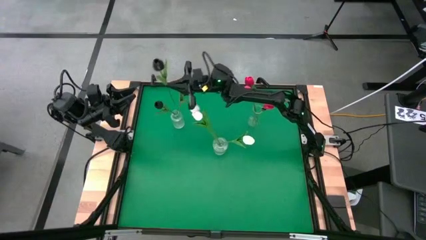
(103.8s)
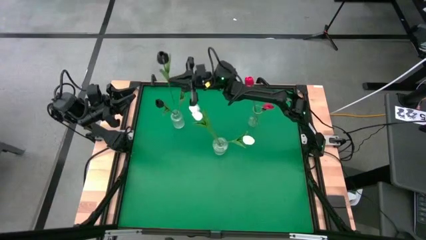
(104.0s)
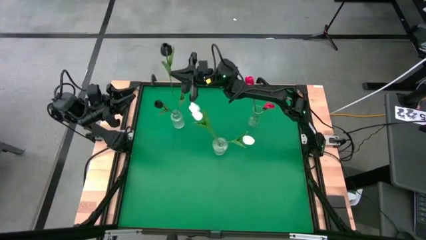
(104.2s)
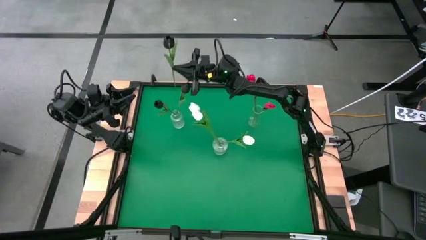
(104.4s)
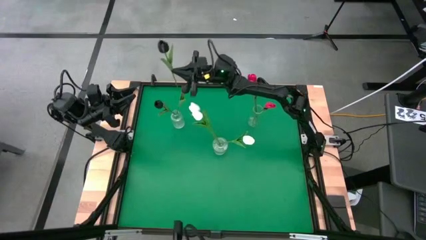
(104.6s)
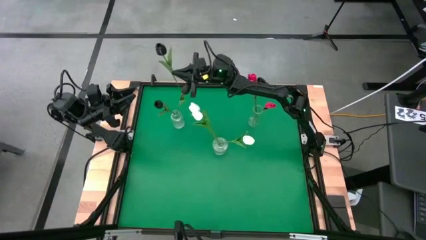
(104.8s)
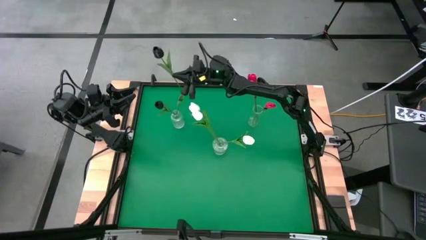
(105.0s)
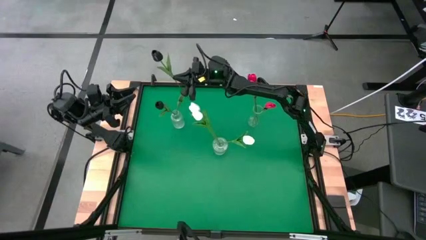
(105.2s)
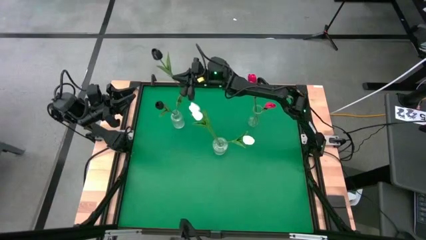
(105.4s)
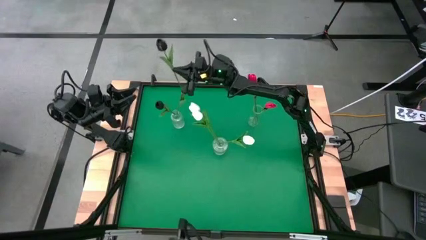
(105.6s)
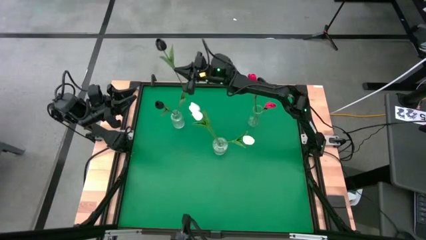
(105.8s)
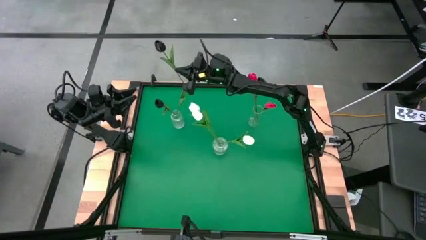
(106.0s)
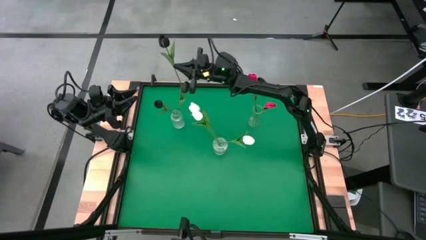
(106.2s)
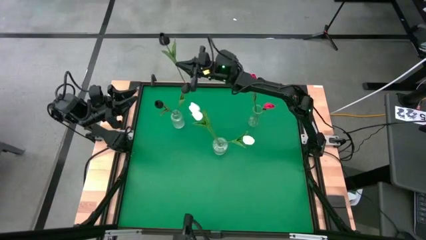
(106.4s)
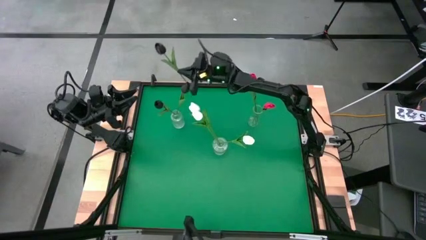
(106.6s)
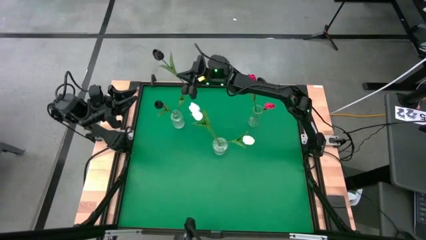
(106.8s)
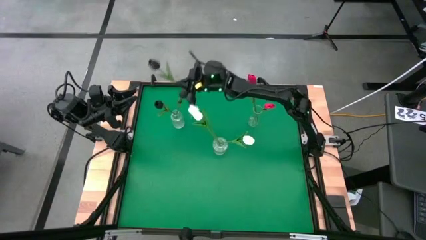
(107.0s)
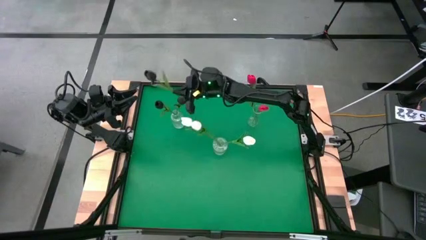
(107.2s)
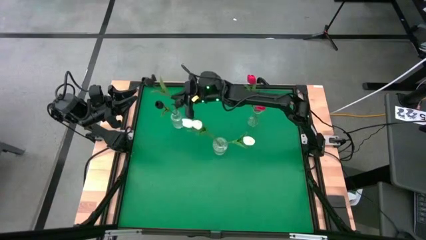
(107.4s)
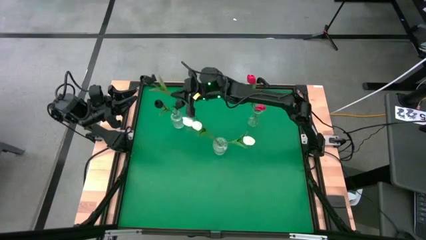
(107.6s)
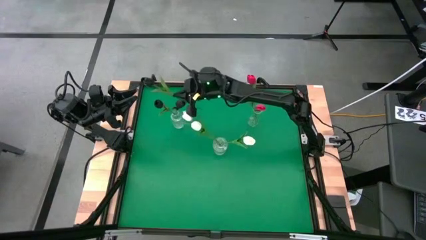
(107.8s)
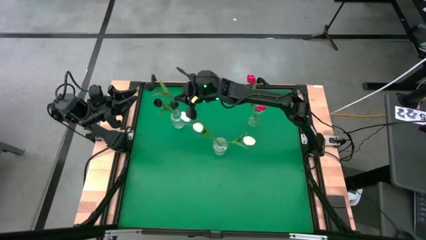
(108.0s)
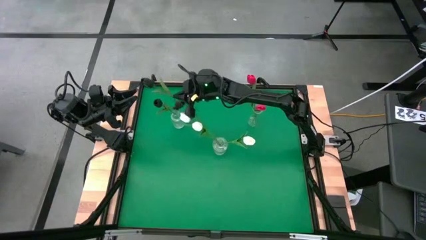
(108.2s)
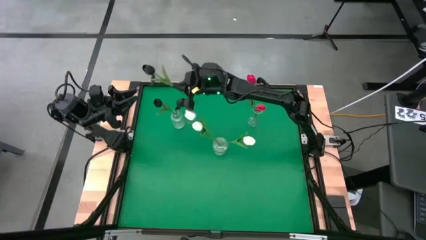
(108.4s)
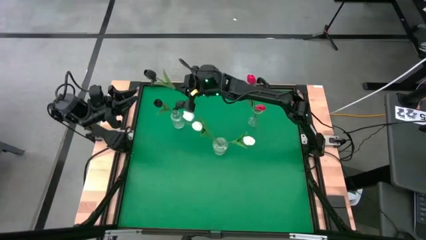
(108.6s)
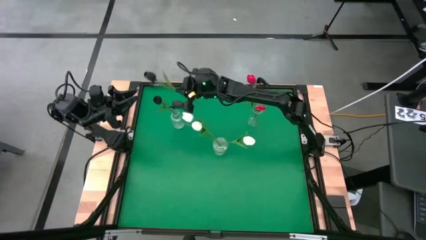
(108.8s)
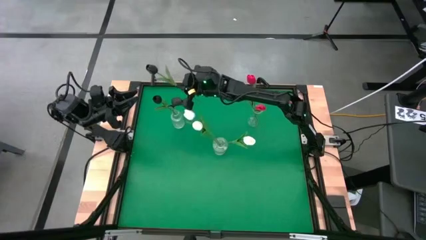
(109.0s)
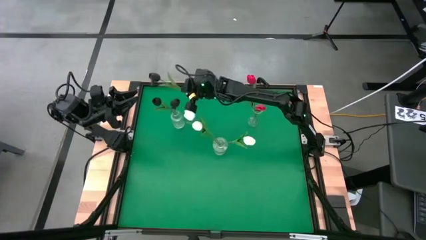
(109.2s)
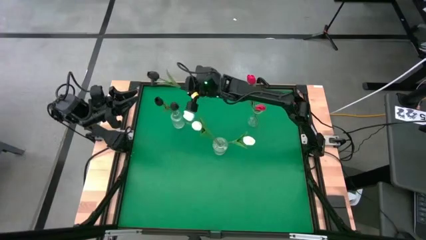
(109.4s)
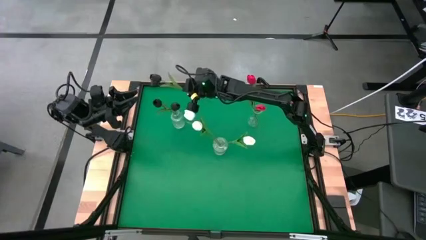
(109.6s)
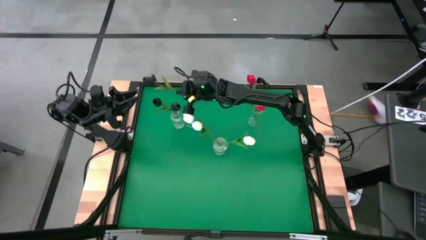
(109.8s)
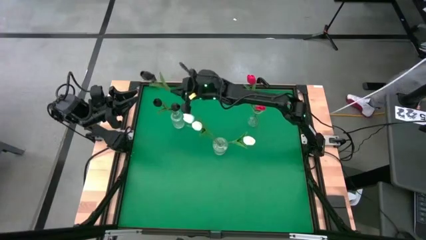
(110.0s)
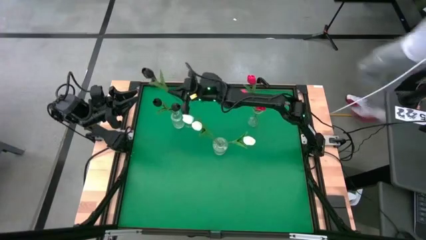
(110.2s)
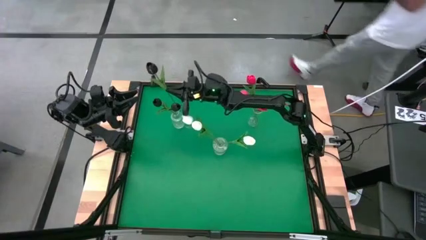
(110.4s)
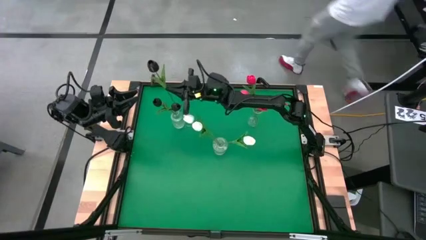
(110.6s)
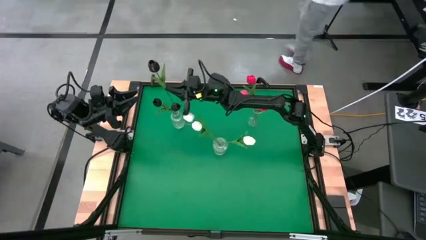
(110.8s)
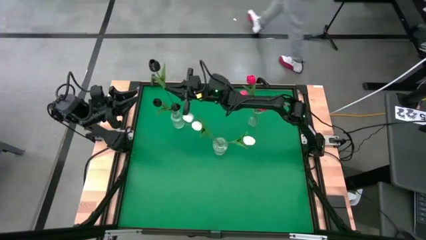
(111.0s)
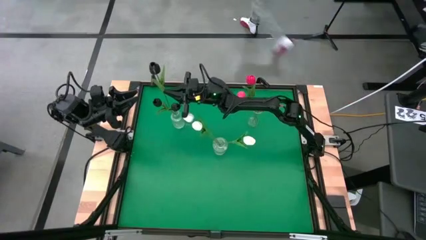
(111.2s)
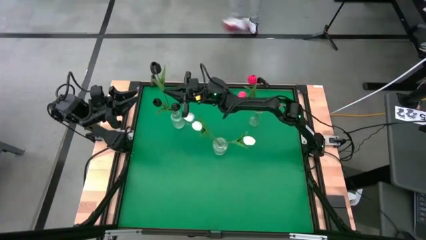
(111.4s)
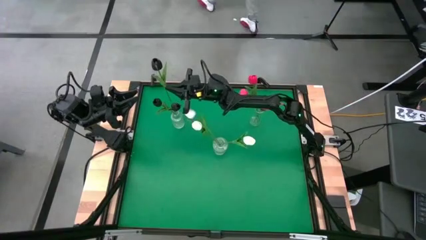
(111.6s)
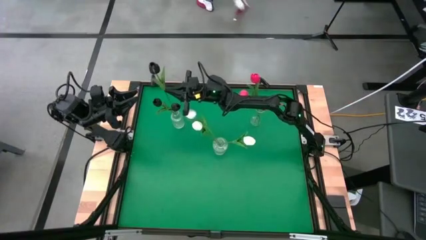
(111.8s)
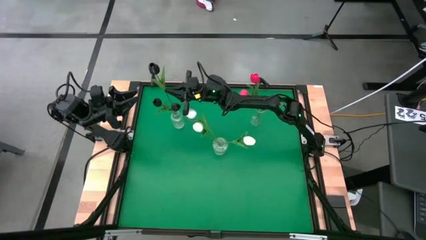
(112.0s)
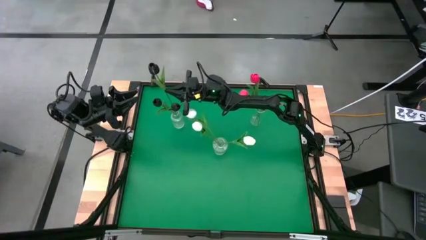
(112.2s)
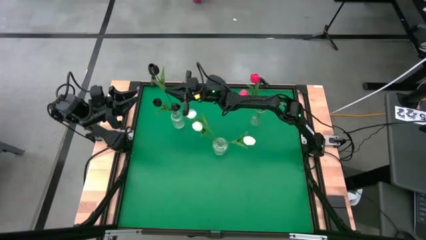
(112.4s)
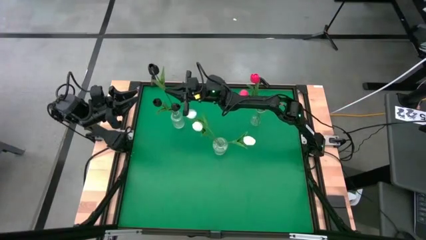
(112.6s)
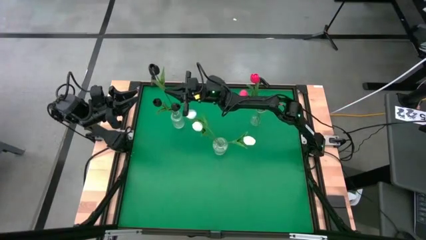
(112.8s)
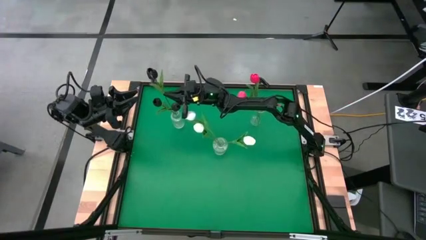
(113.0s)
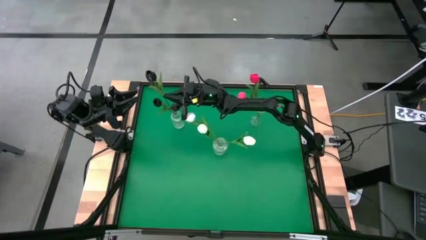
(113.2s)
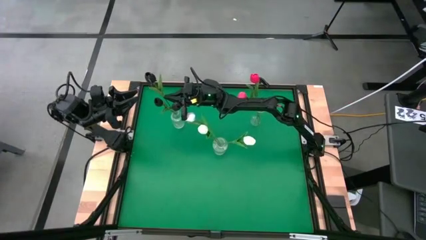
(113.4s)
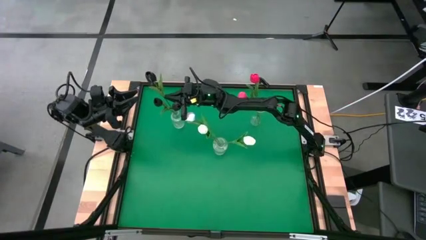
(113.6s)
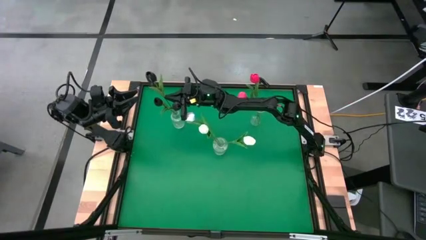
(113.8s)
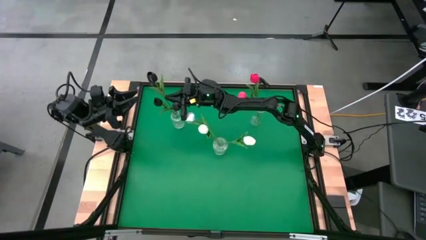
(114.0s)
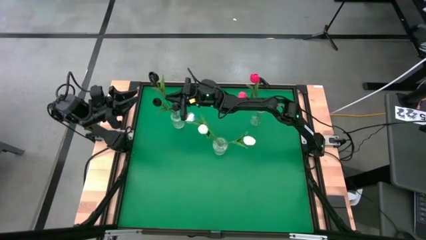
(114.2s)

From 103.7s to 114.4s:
Task: Sort flowers into vase by color
Put the black tulip into the left transparent vase
